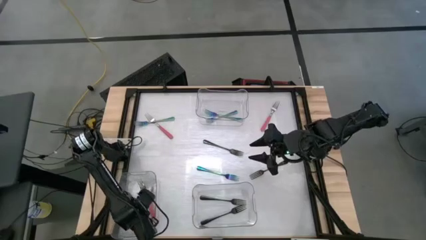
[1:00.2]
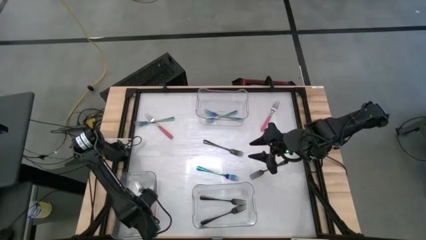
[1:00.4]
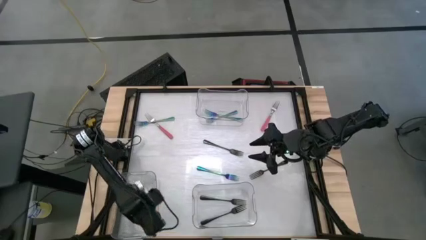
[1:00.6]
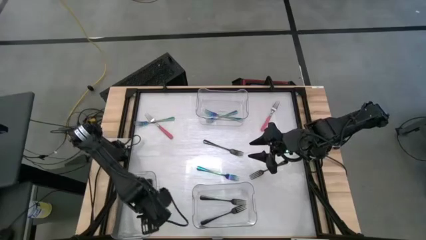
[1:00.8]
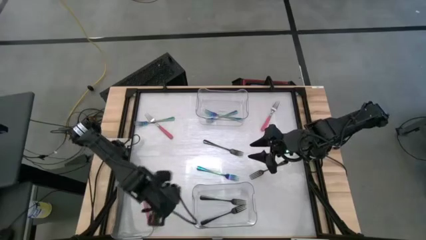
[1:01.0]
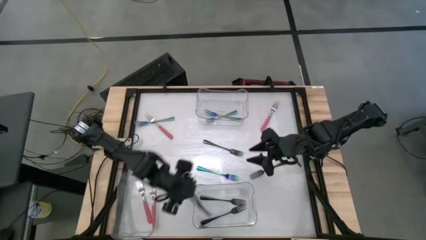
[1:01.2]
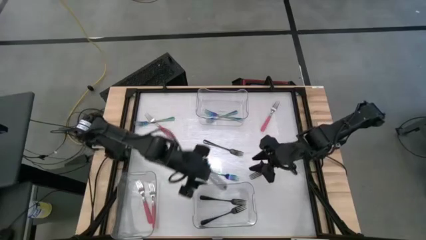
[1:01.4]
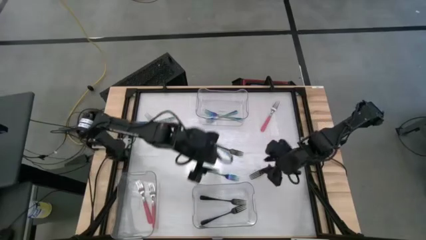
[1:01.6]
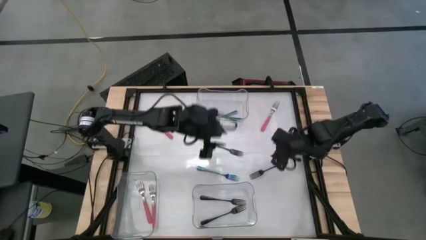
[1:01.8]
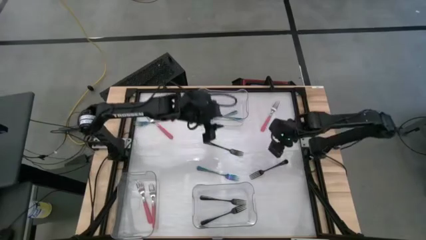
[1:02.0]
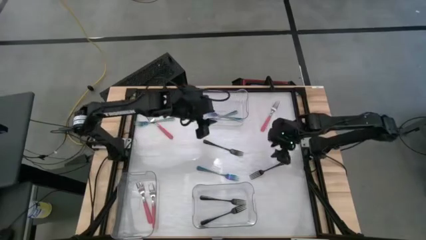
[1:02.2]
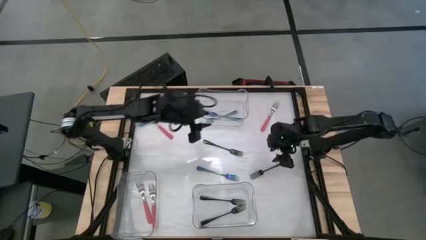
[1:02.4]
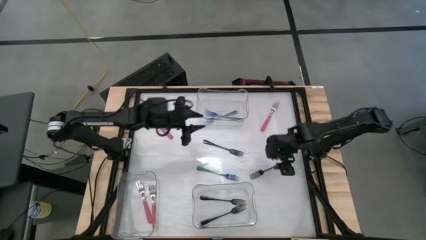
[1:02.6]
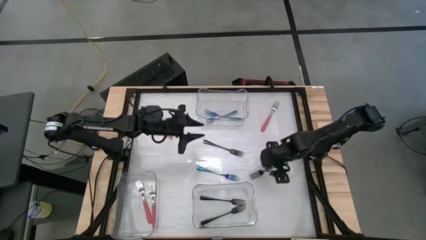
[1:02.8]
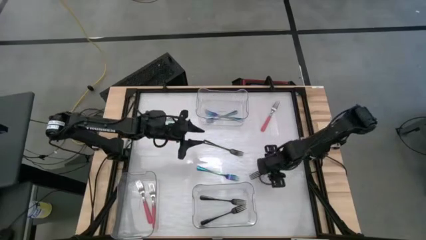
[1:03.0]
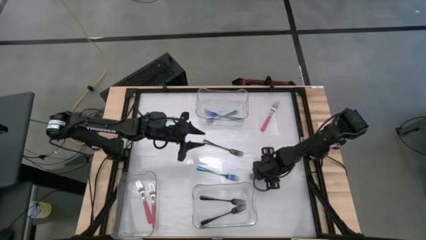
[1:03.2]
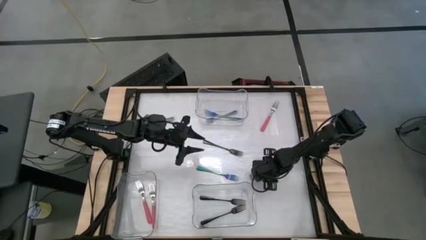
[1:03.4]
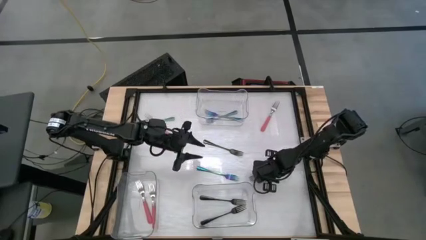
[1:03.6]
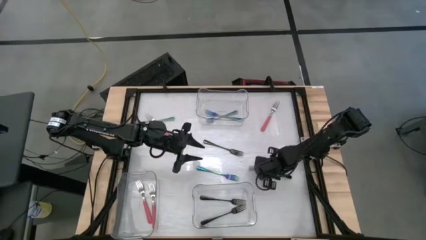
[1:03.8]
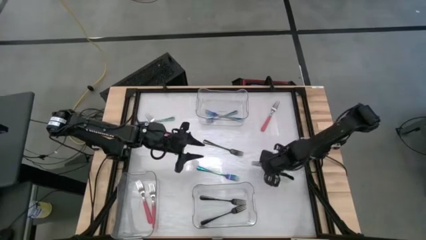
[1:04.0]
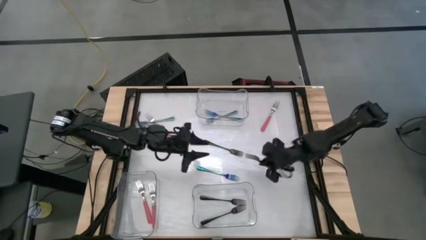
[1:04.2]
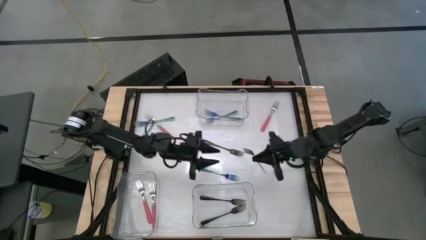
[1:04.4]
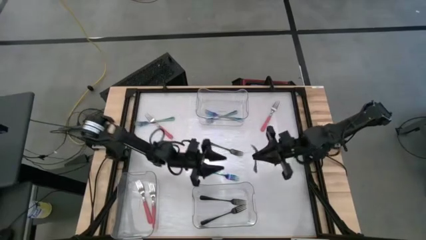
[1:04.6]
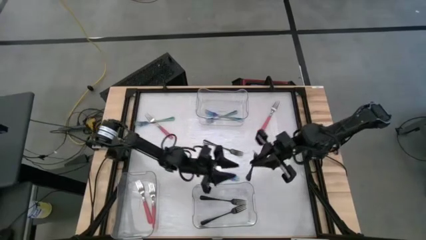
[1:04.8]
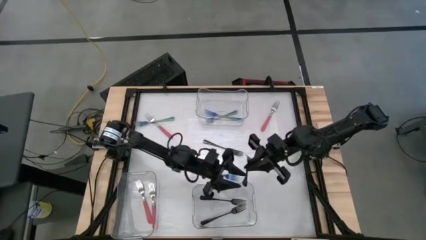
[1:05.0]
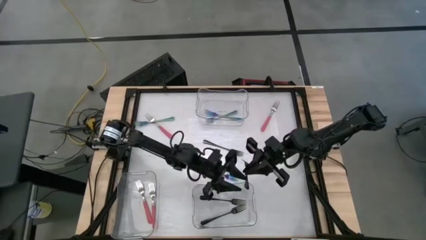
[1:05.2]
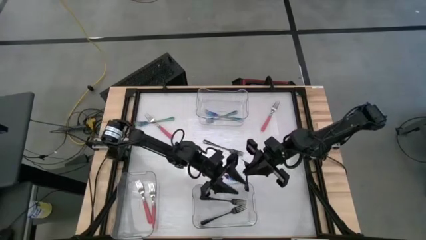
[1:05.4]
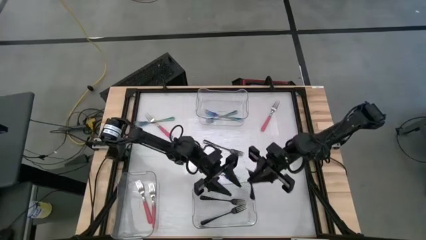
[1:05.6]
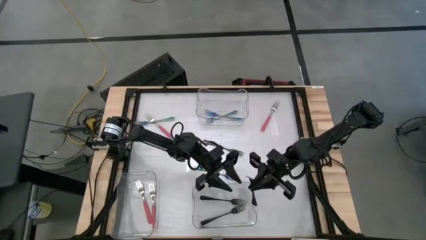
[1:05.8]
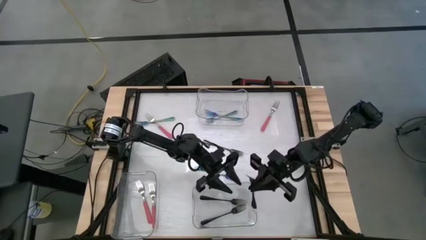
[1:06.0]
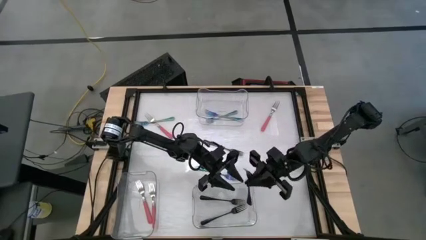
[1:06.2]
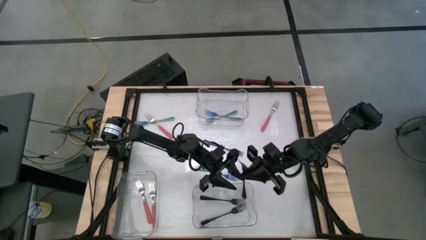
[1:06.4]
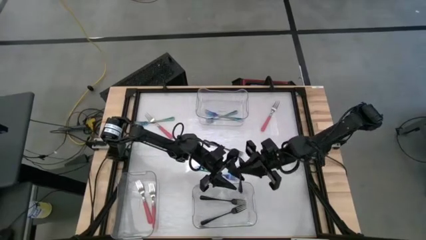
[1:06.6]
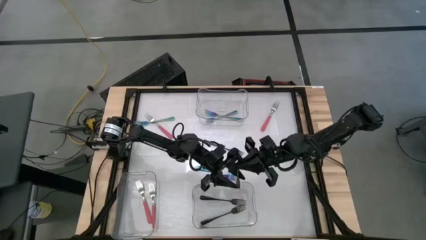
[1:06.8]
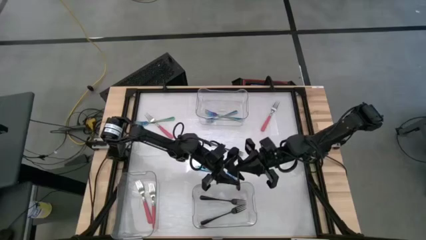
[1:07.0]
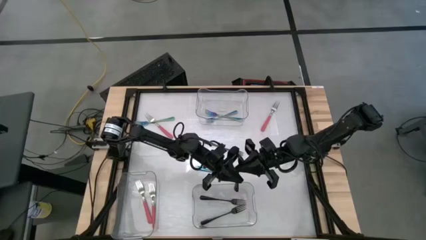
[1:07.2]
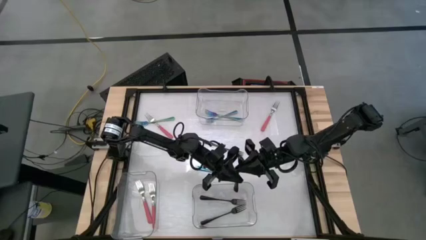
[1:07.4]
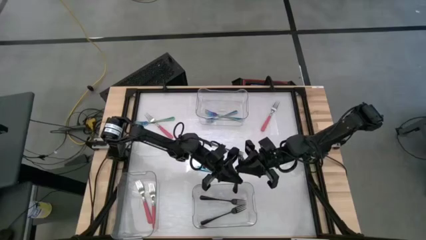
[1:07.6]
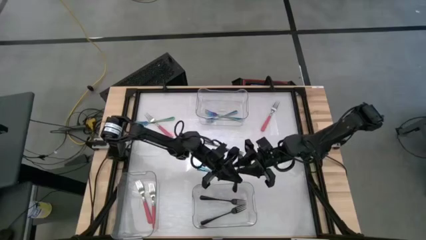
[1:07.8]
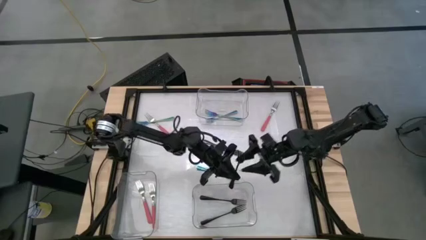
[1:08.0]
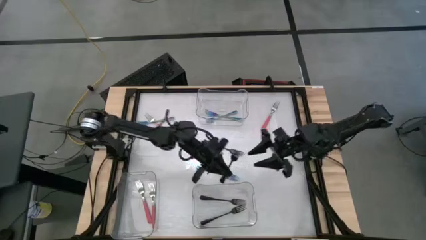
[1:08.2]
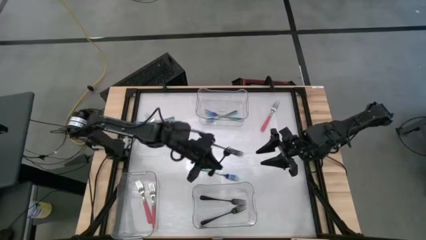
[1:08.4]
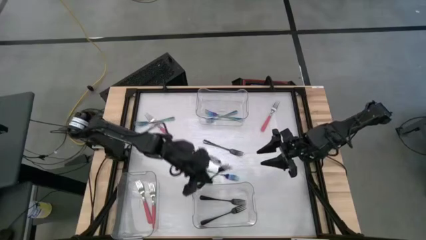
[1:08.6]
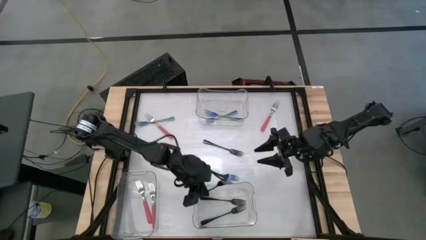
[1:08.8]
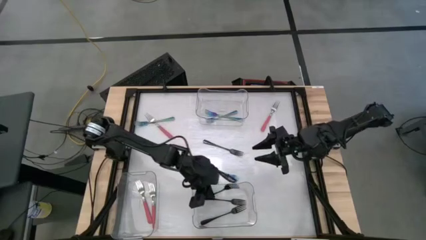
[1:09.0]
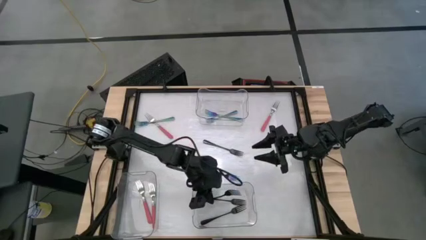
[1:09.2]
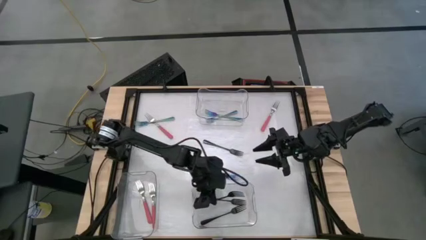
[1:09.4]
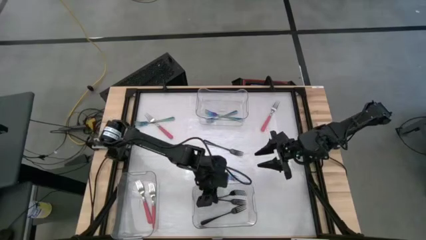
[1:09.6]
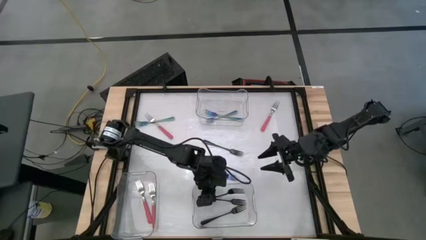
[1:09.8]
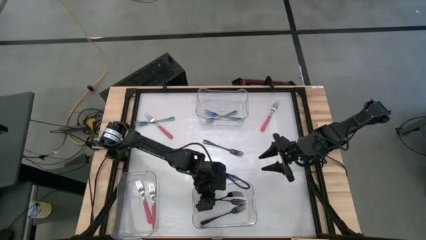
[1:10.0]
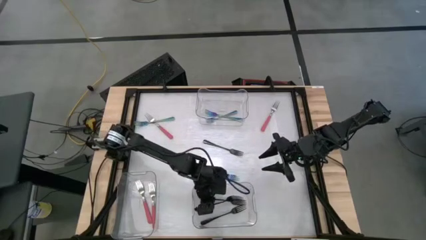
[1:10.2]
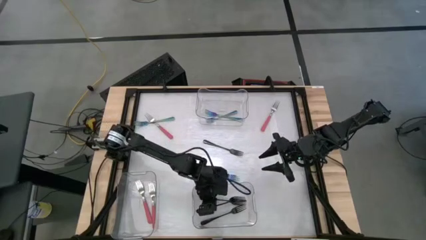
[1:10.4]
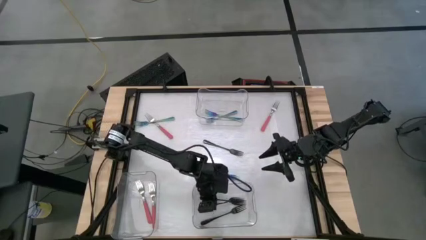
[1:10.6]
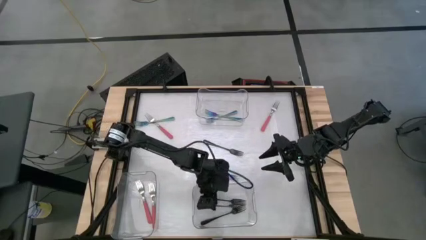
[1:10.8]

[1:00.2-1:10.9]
Task: Sort silverware by color (type)
Put the black fork into the bottom right transparent bin

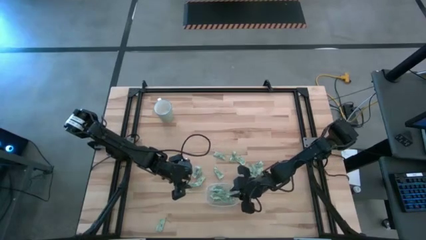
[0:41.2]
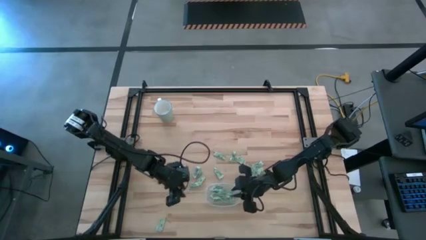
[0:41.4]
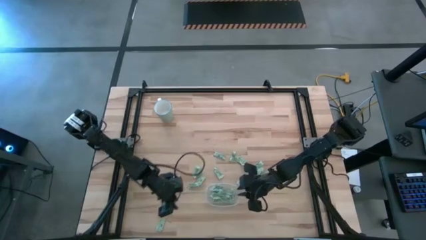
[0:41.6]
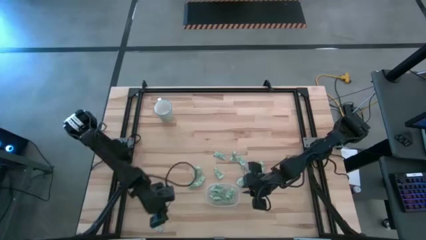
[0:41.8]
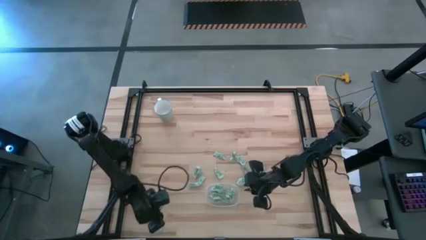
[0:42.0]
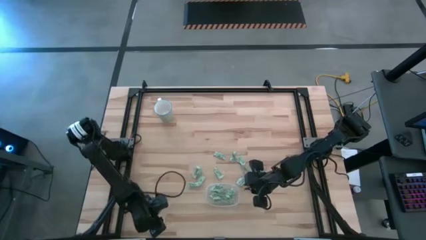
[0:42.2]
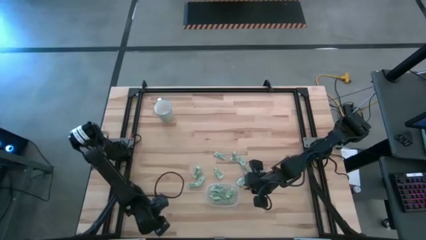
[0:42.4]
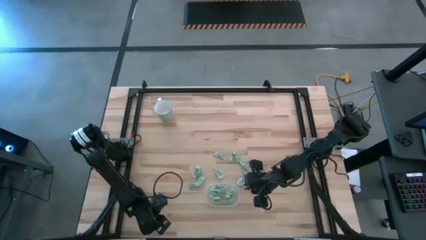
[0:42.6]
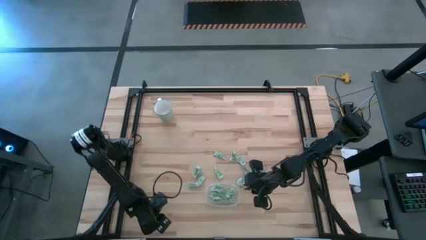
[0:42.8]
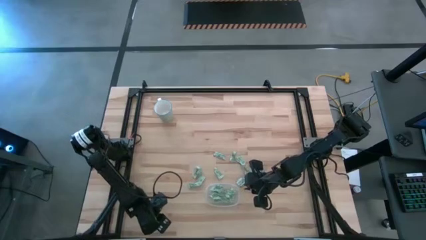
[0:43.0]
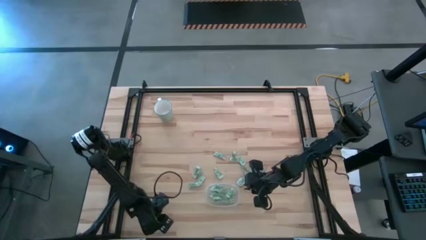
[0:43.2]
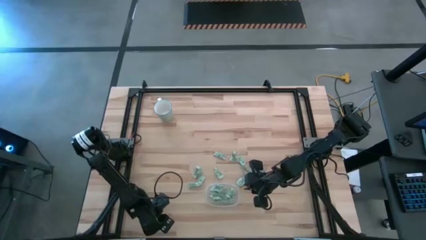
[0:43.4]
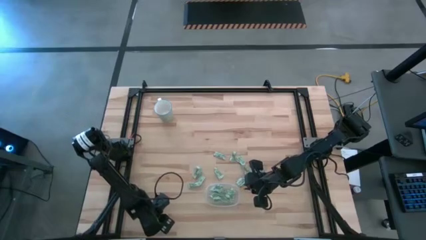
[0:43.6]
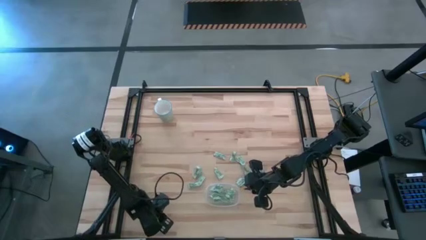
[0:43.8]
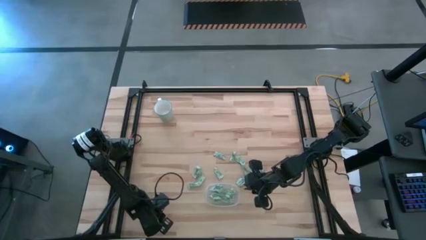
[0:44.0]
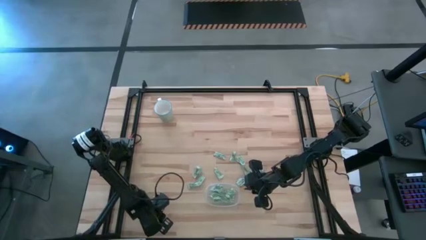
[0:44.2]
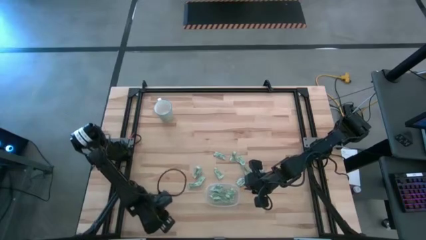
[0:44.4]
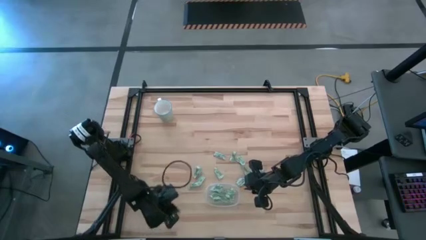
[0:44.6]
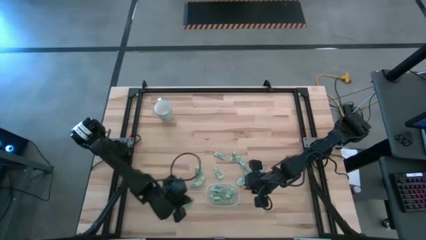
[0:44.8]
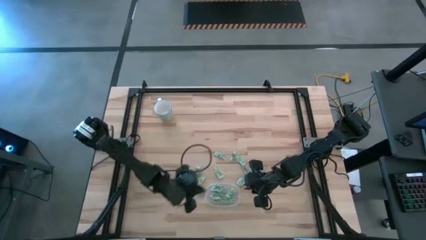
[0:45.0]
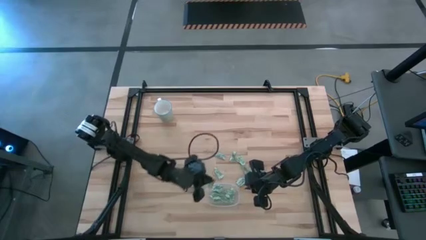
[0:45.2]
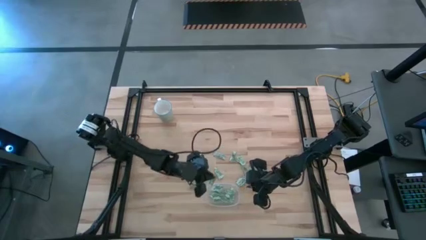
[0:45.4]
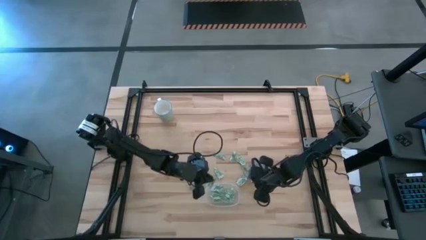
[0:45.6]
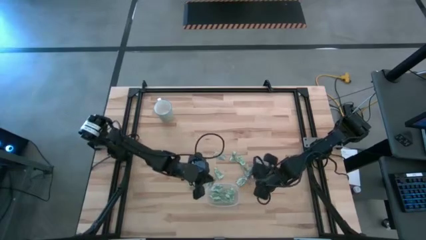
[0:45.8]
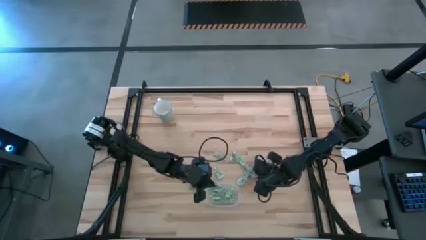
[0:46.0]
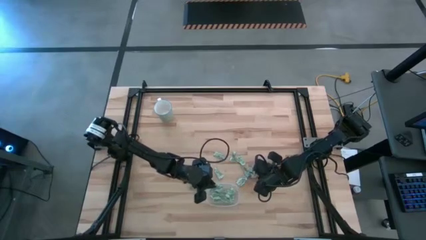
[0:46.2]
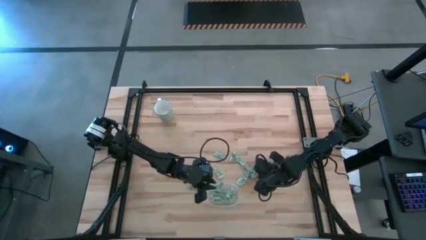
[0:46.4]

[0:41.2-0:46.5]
Task: Pick and place Stevia / Truvia into bins
Put the stevia packet into the transparent container
